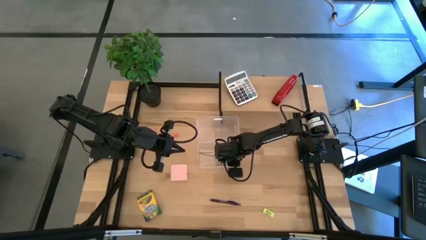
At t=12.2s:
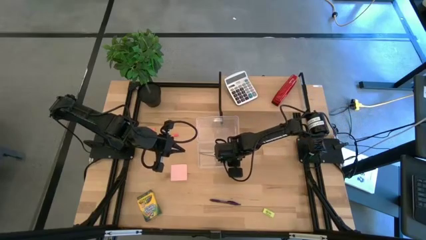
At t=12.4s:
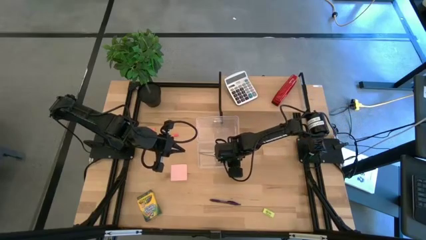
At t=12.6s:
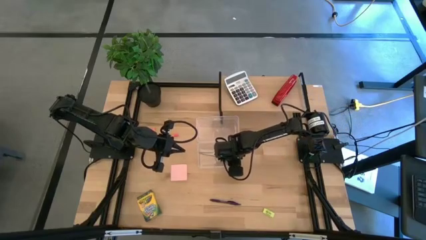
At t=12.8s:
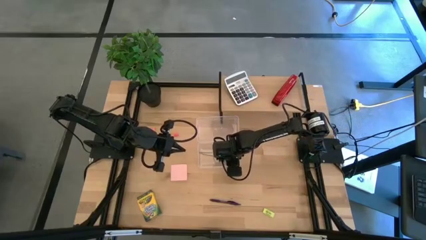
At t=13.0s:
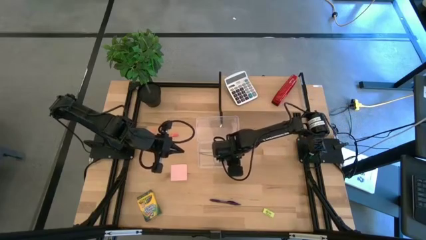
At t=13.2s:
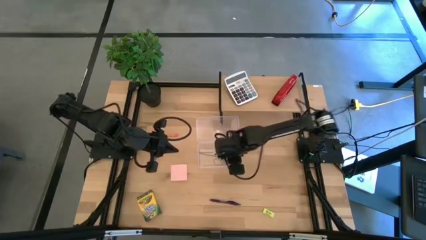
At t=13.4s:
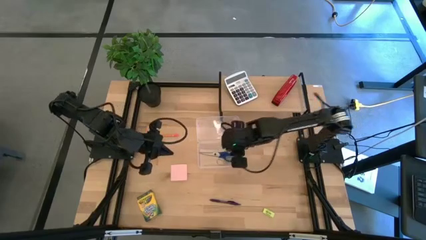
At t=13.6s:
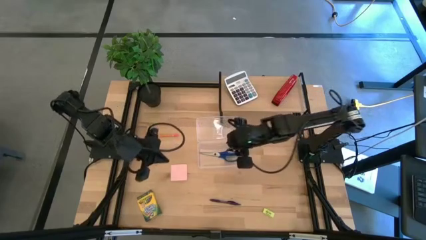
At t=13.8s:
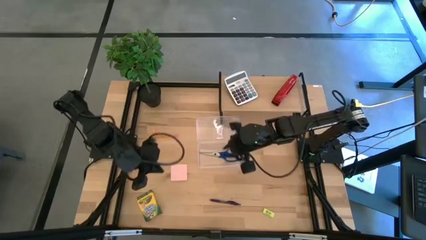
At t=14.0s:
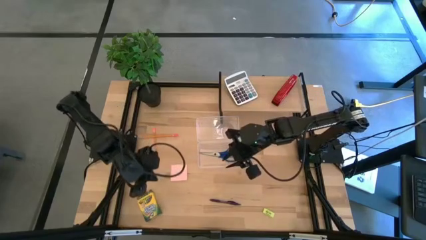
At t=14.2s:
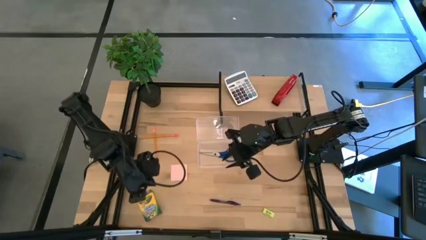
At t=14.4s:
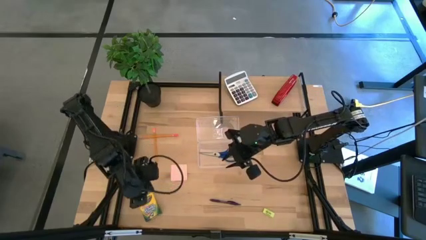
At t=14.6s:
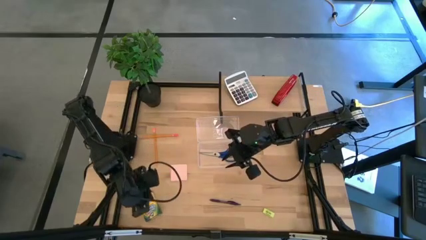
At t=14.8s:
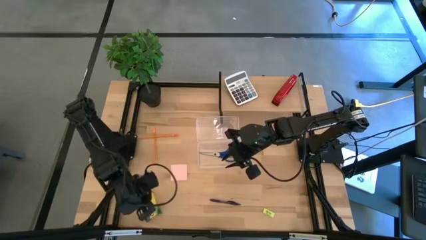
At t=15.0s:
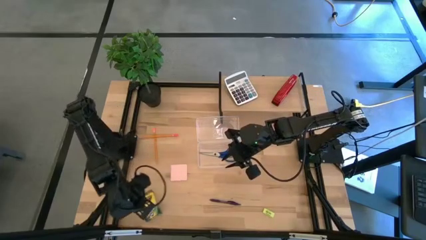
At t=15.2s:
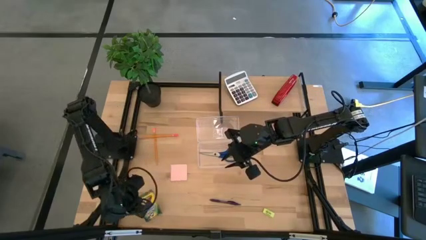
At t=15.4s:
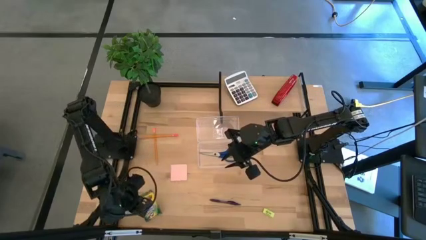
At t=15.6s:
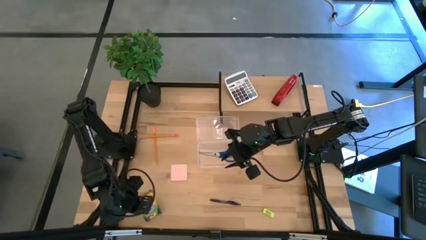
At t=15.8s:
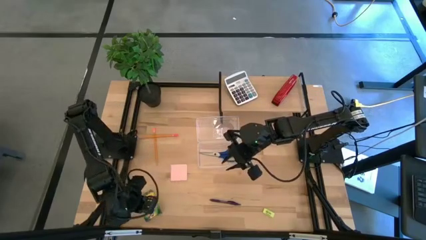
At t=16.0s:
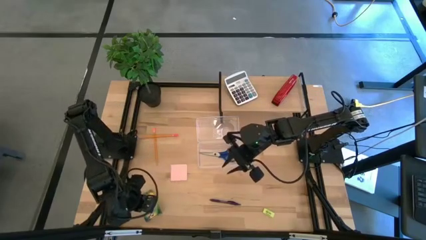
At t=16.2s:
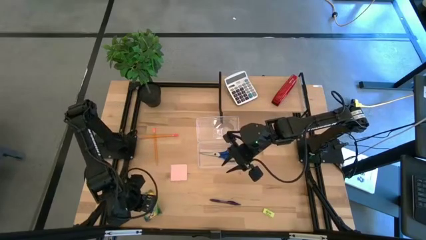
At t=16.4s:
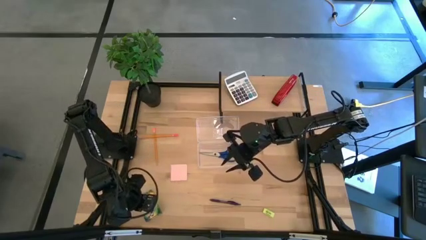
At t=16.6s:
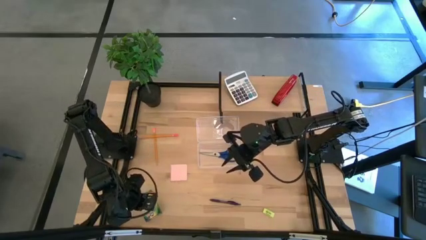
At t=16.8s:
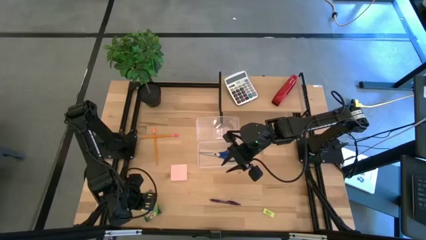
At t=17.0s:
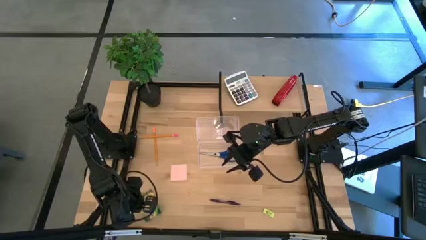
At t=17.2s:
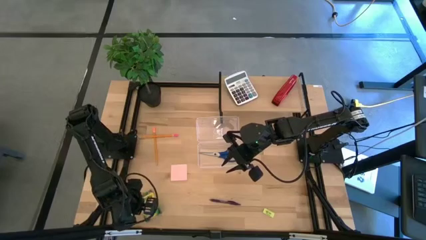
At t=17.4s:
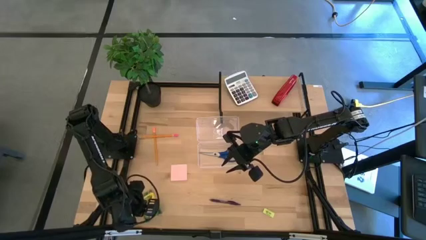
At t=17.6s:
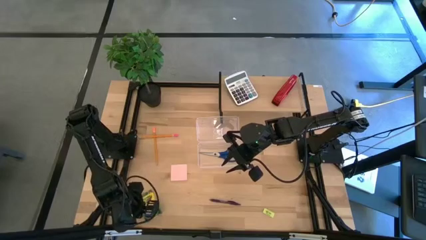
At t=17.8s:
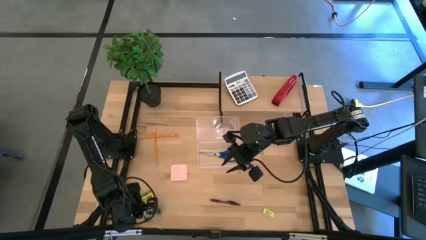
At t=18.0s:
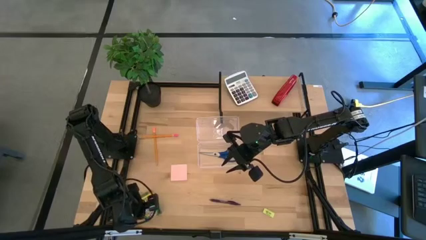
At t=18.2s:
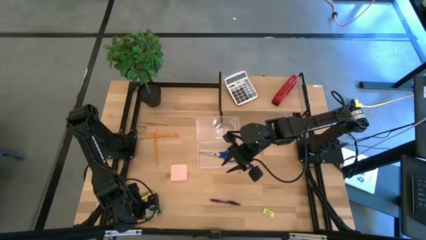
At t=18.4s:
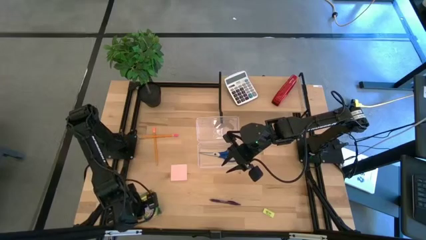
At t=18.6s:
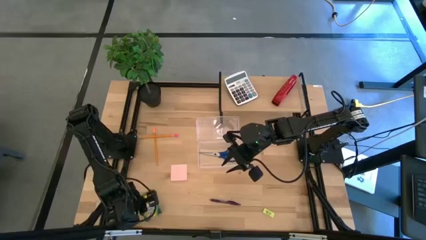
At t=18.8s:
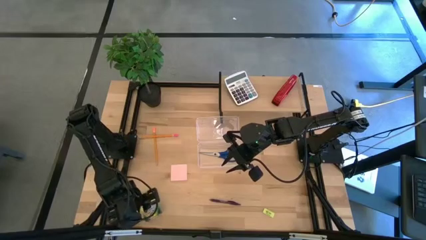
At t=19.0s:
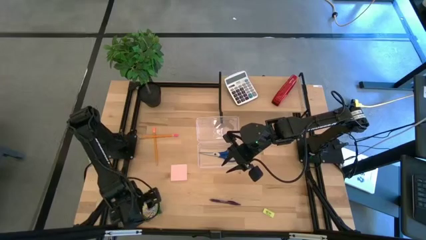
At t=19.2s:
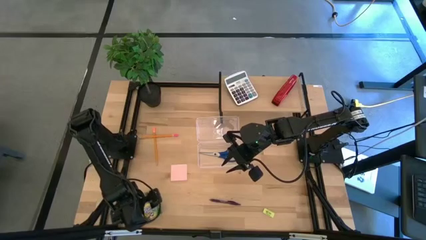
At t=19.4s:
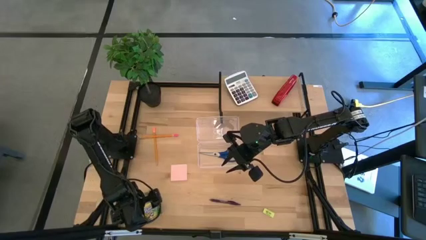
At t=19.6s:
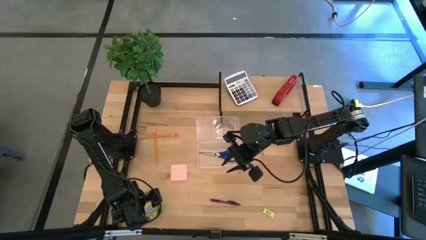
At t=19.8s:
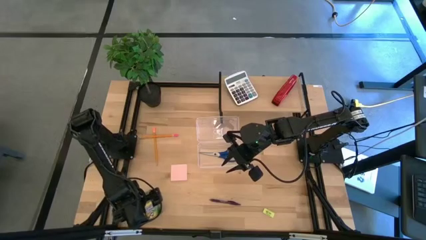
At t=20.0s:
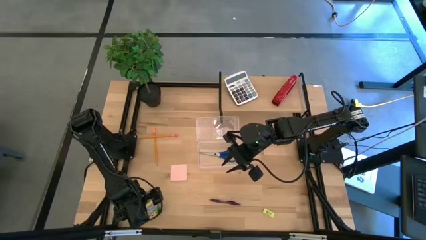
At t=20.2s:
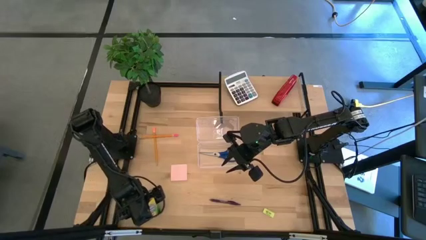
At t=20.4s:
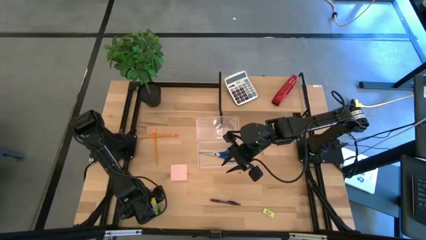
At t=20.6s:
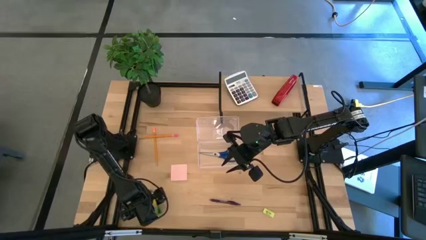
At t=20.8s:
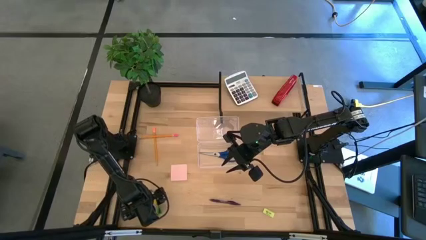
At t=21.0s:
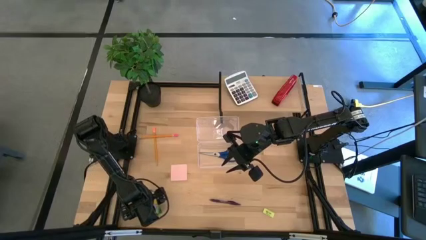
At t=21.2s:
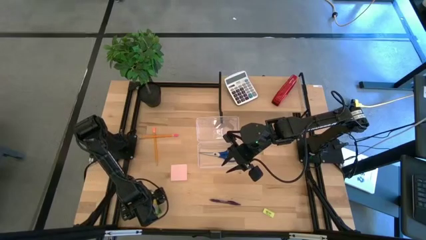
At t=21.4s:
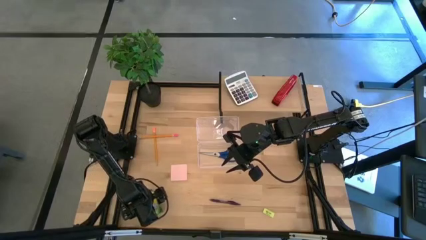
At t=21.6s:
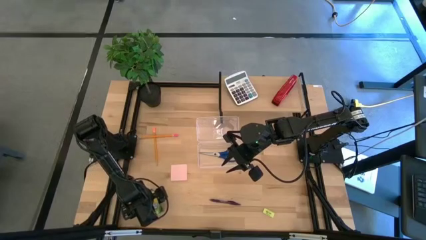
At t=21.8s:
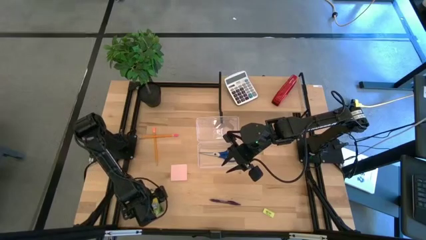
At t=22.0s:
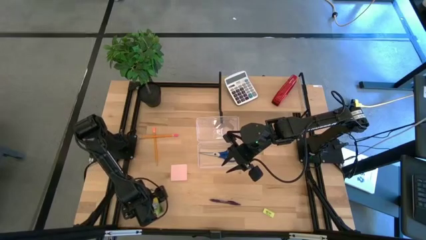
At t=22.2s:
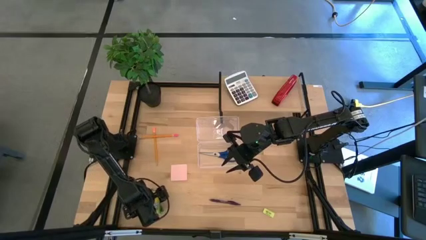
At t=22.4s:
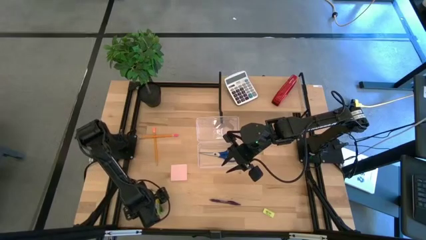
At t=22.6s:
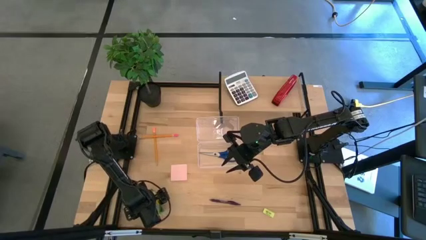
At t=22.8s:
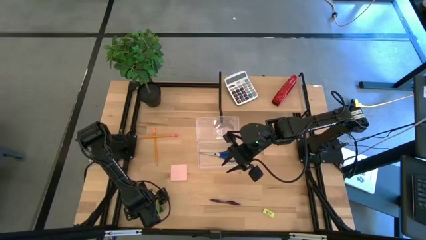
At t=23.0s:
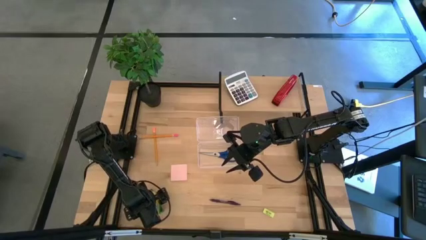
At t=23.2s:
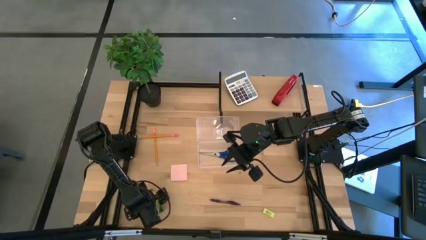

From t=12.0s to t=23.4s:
Task: Pack school essentials
Put the yellow crayon box into the transparent supply box

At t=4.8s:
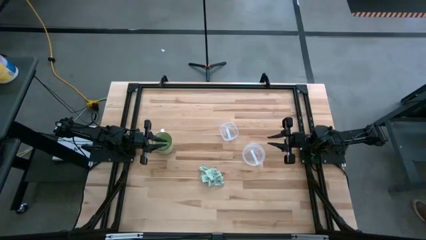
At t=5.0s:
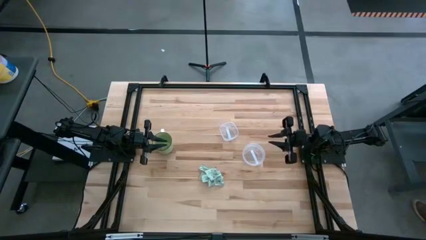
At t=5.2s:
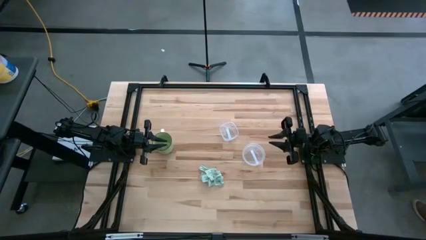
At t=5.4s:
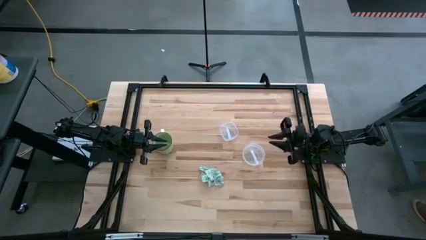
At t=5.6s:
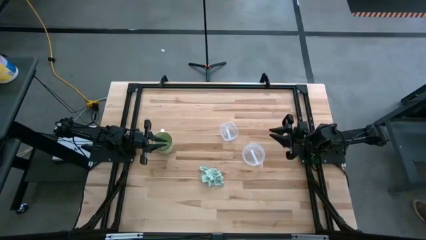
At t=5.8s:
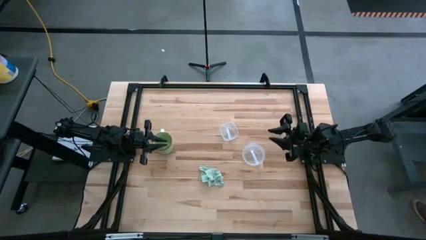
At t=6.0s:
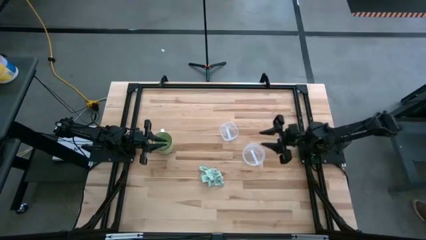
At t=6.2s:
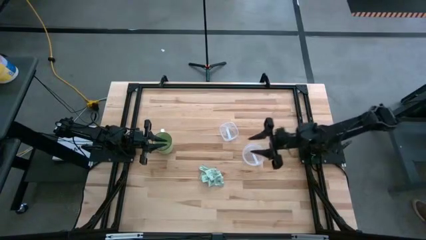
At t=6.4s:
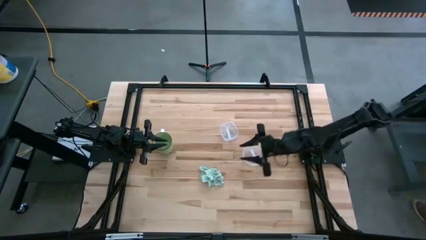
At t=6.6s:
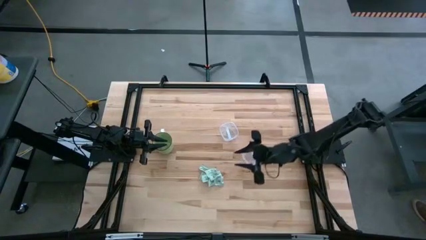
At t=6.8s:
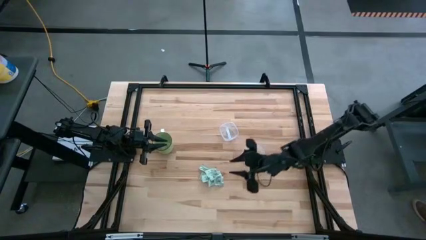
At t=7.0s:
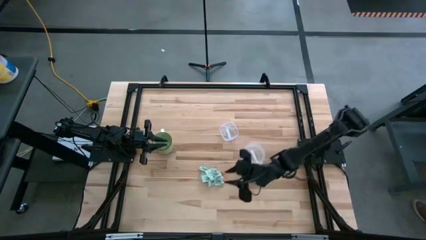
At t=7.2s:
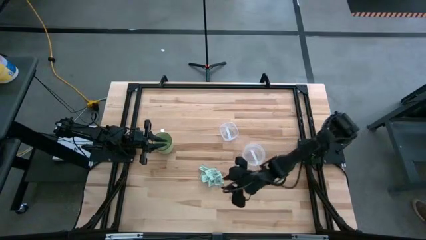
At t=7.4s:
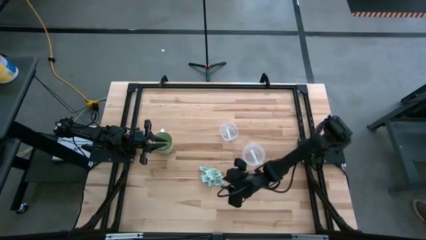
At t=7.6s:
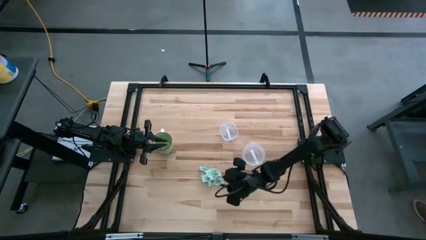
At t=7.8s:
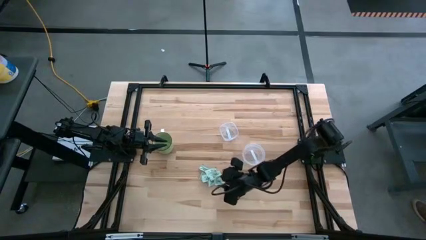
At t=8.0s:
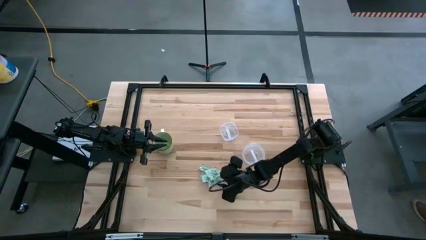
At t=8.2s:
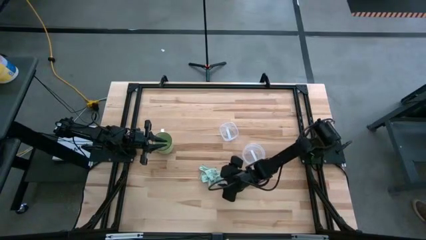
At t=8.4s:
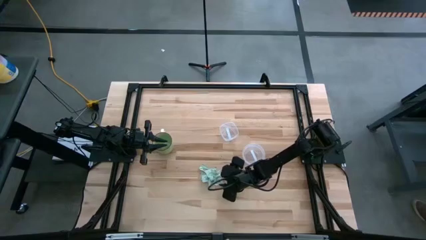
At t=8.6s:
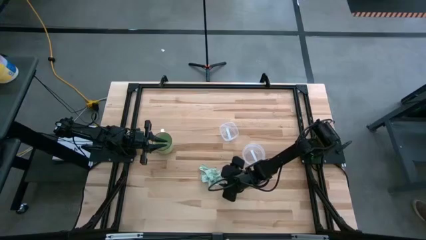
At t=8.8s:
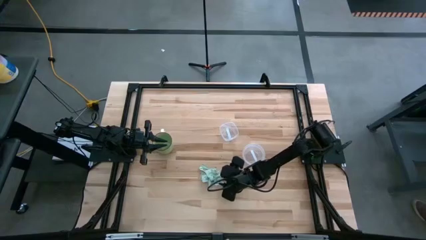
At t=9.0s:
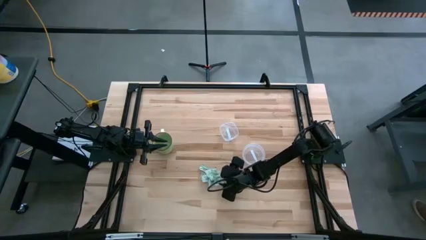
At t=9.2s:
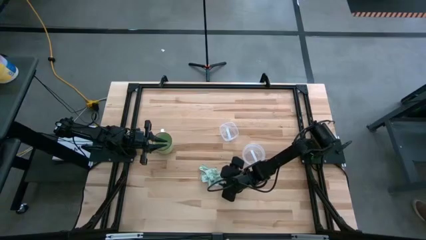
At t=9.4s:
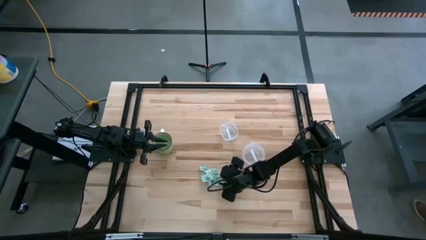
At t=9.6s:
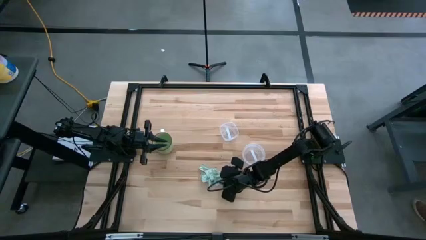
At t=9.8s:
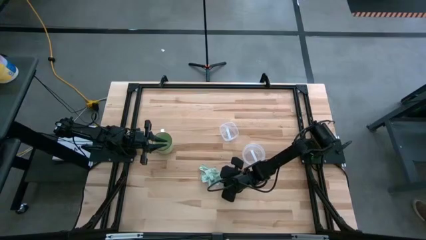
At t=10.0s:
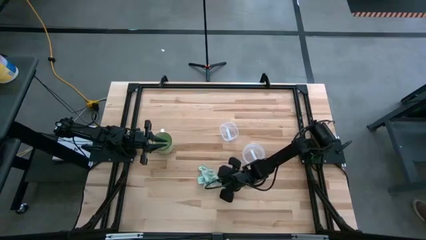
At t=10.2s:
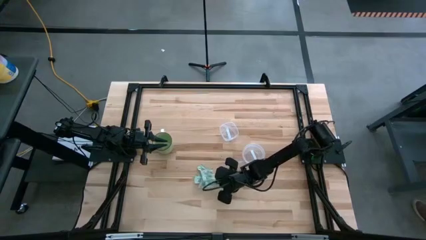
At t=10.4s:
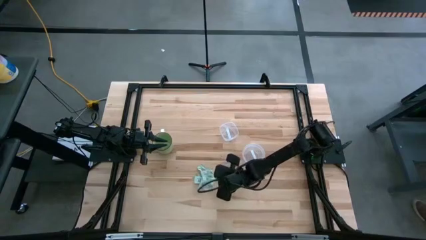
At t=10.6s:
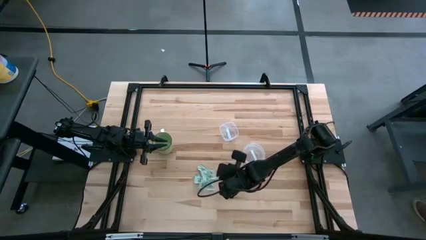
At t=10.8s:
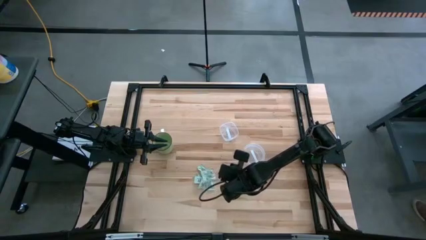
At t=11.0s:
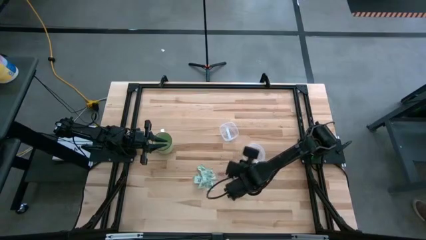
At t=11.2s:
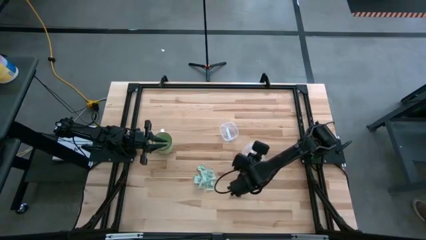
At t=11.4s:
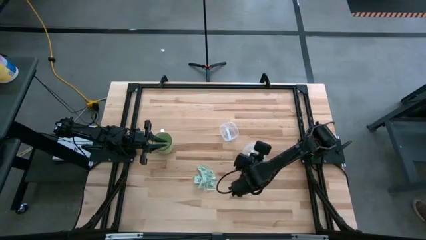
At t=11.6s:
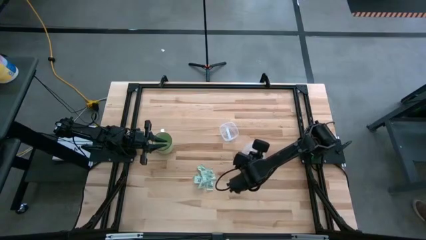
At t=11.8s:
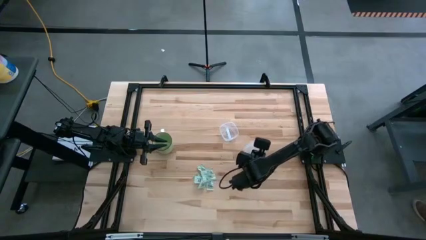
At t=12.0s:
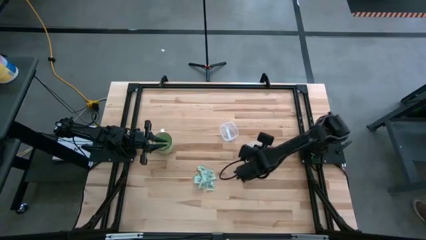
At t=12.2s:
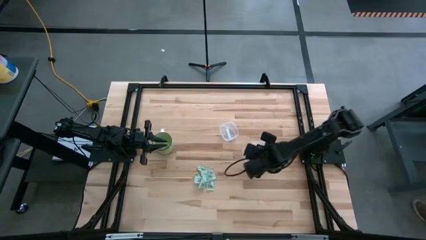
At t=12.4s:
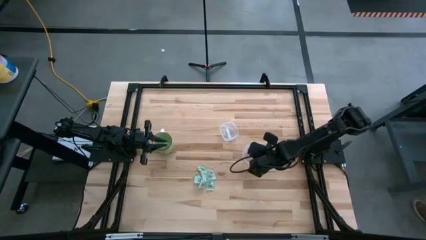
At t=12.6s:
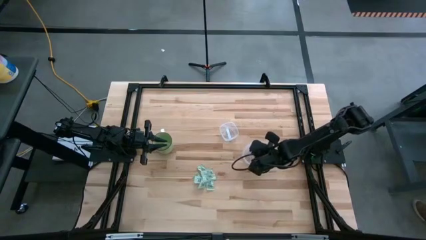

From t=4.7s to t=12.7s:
Task: Pick and place Stevia / Truvia into bins
Put the stevia packet into the bottom transparent container
